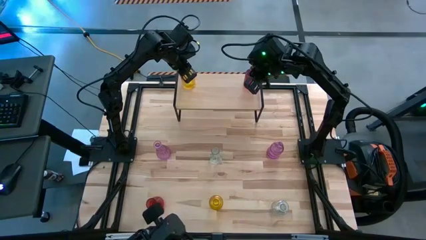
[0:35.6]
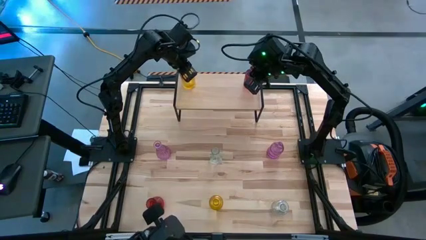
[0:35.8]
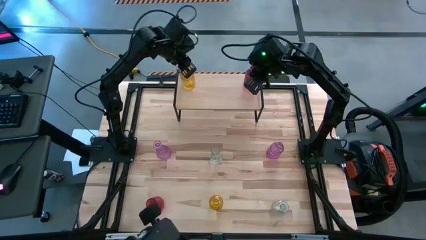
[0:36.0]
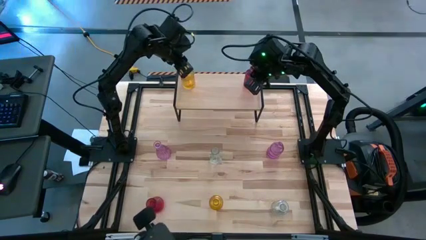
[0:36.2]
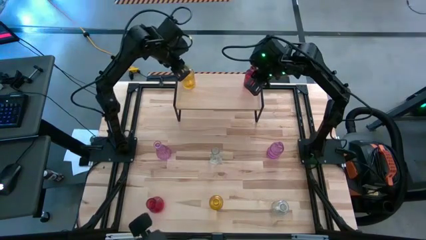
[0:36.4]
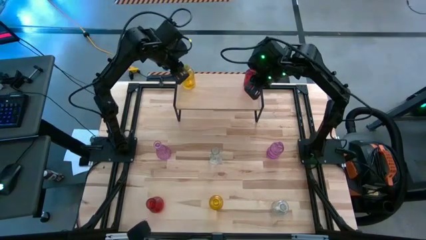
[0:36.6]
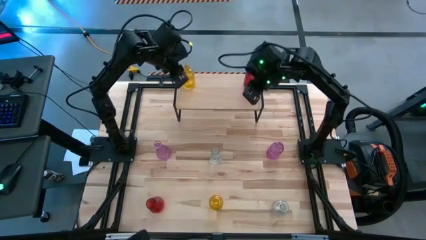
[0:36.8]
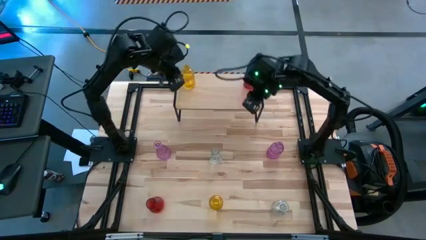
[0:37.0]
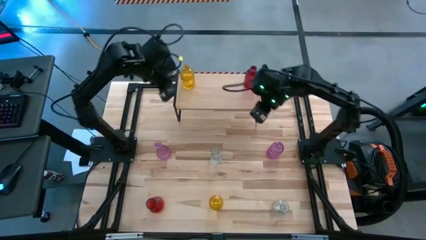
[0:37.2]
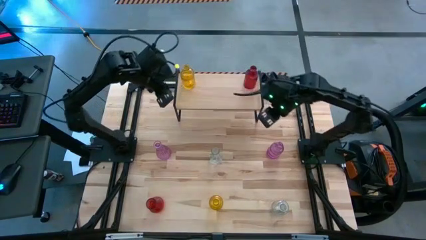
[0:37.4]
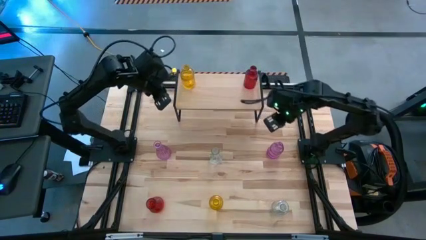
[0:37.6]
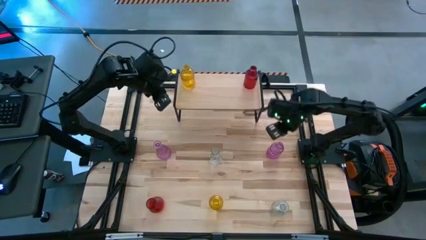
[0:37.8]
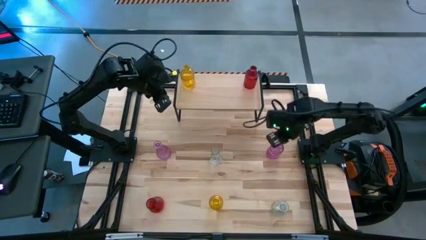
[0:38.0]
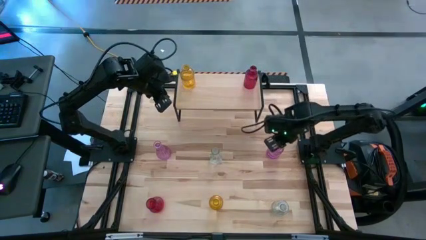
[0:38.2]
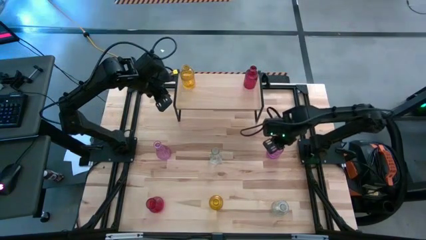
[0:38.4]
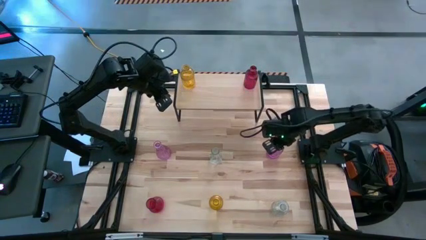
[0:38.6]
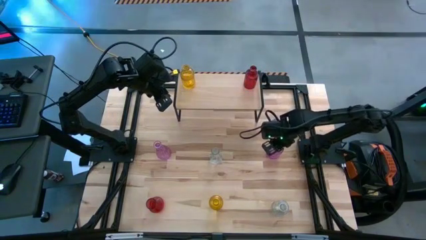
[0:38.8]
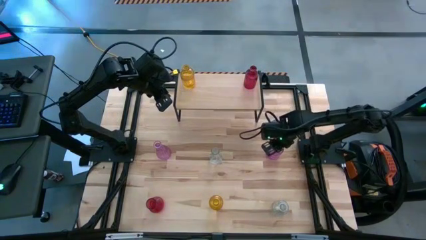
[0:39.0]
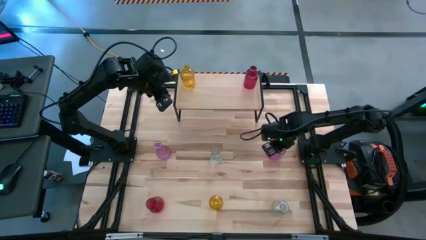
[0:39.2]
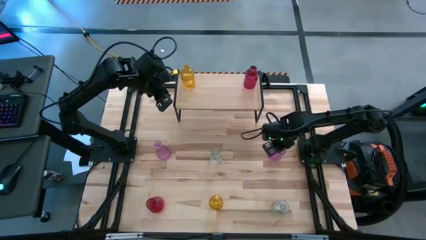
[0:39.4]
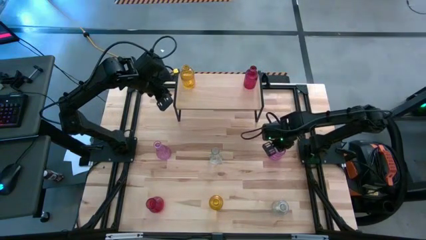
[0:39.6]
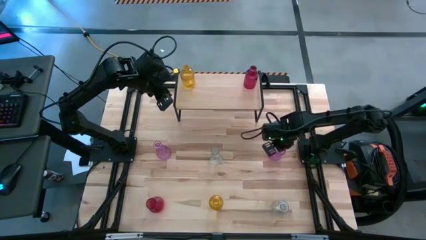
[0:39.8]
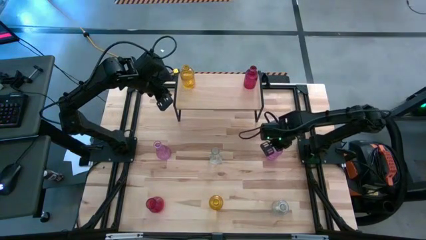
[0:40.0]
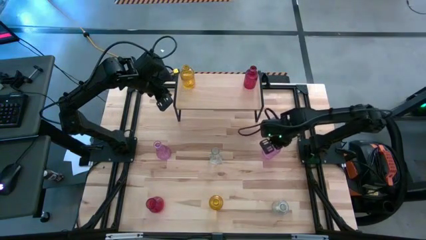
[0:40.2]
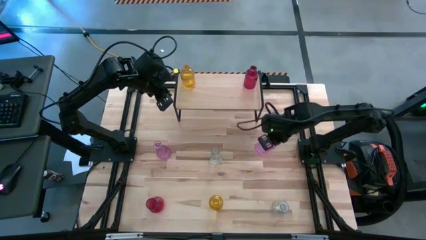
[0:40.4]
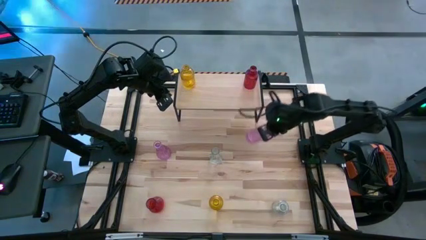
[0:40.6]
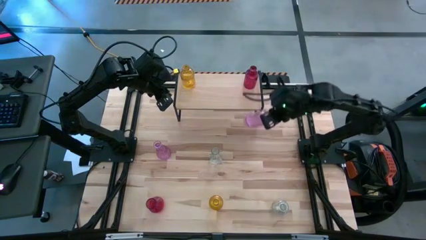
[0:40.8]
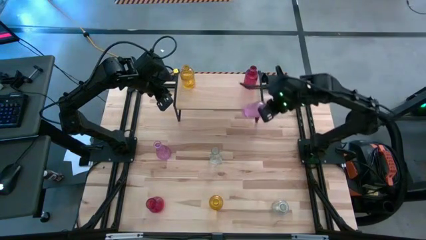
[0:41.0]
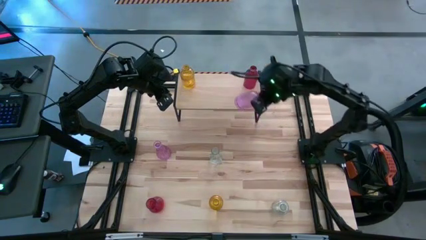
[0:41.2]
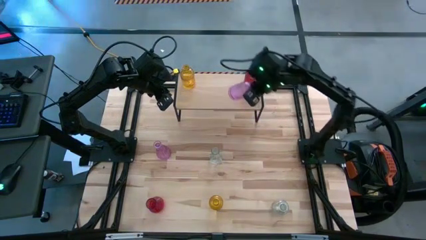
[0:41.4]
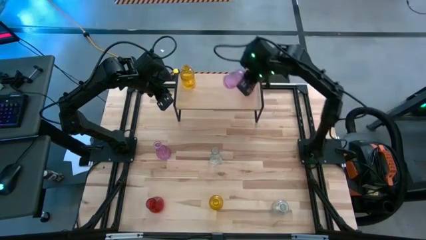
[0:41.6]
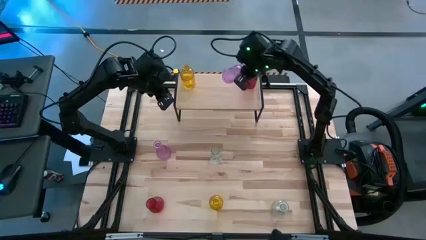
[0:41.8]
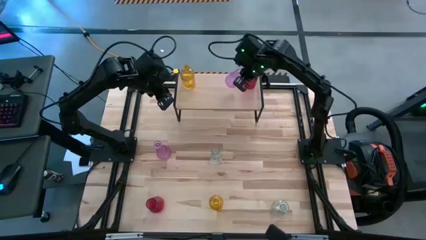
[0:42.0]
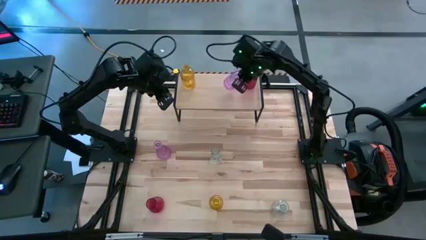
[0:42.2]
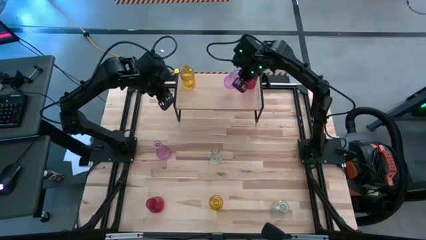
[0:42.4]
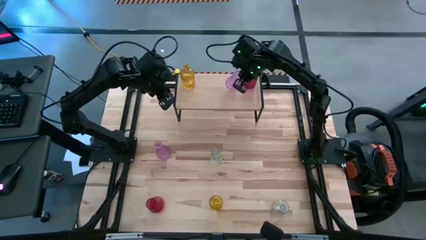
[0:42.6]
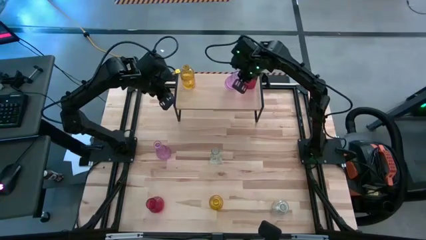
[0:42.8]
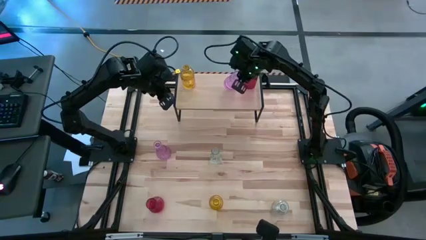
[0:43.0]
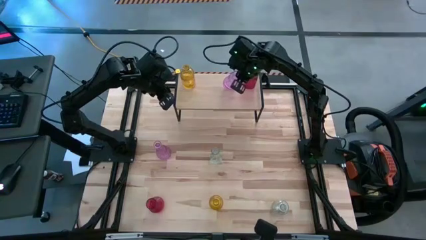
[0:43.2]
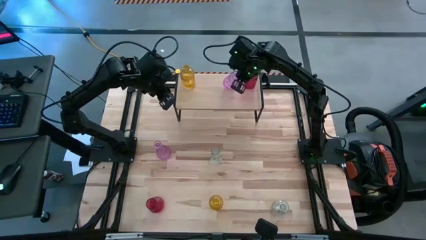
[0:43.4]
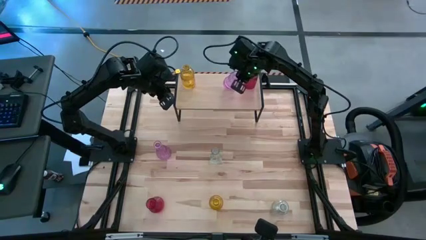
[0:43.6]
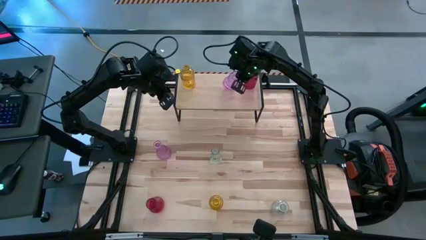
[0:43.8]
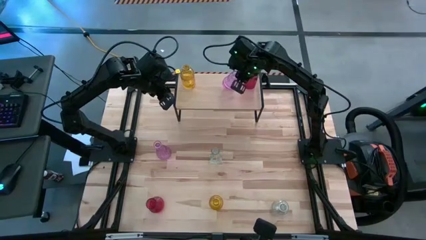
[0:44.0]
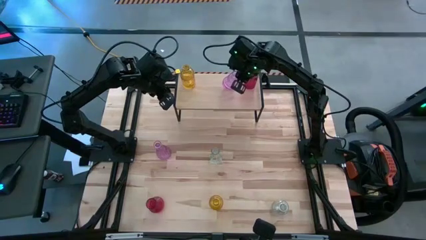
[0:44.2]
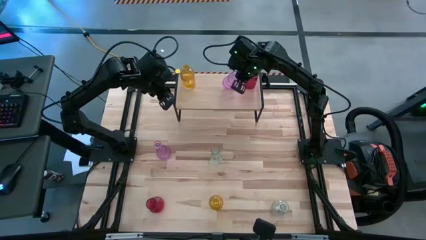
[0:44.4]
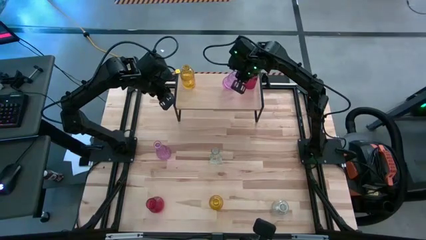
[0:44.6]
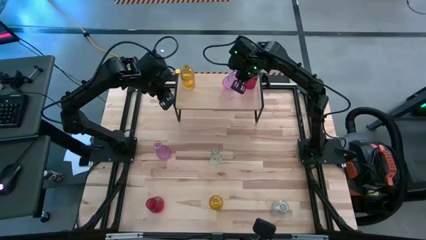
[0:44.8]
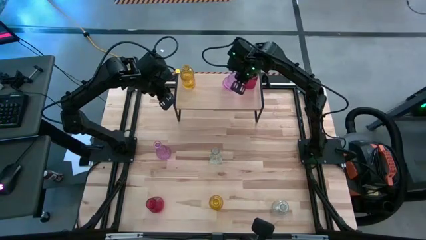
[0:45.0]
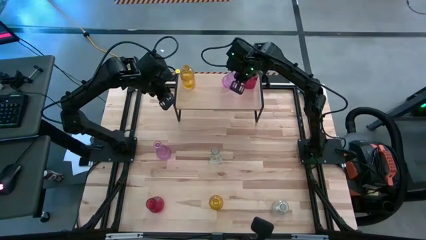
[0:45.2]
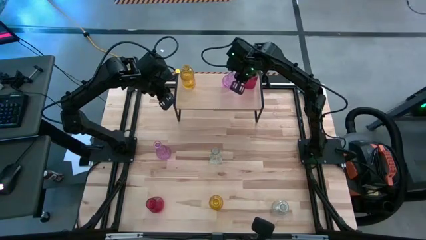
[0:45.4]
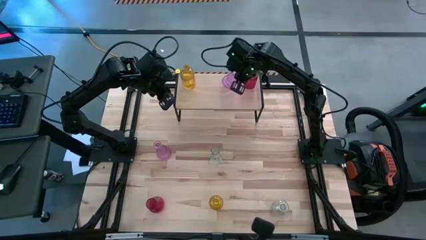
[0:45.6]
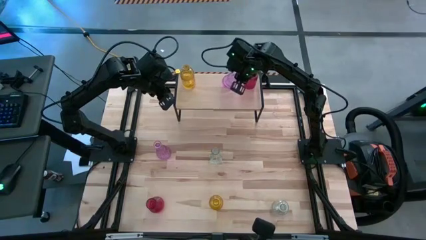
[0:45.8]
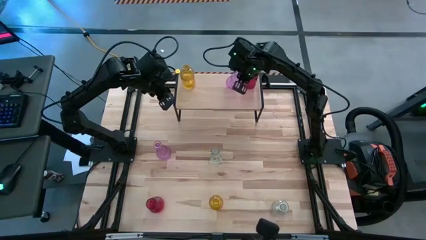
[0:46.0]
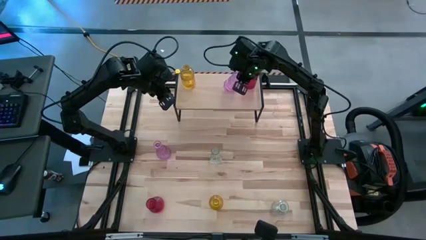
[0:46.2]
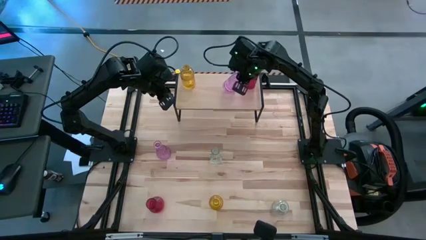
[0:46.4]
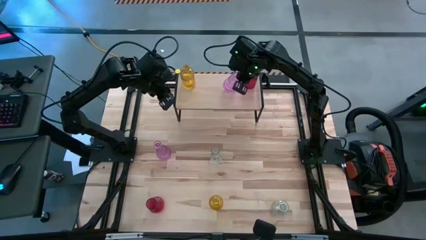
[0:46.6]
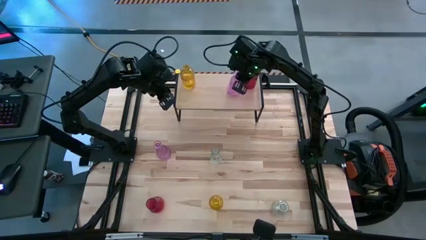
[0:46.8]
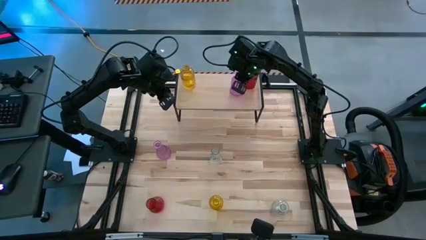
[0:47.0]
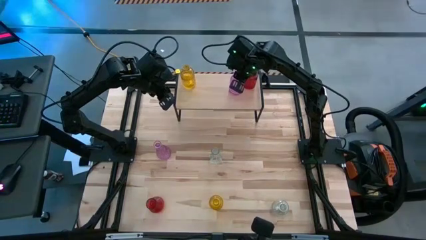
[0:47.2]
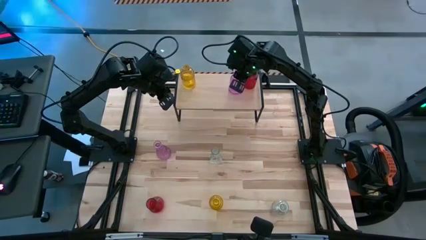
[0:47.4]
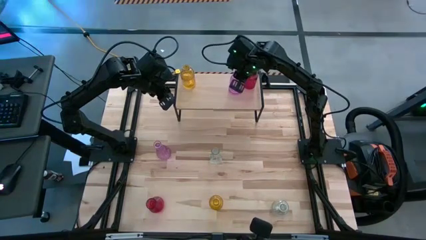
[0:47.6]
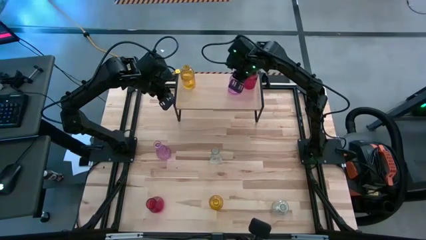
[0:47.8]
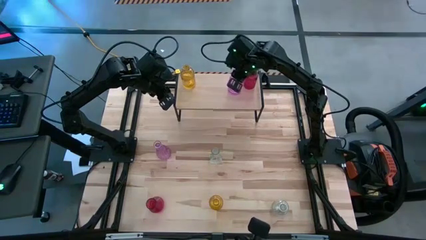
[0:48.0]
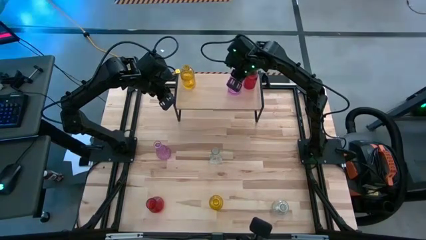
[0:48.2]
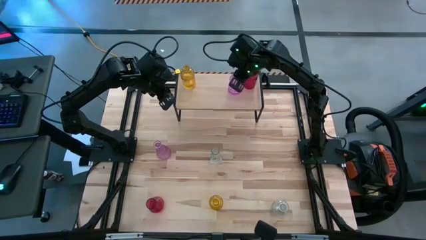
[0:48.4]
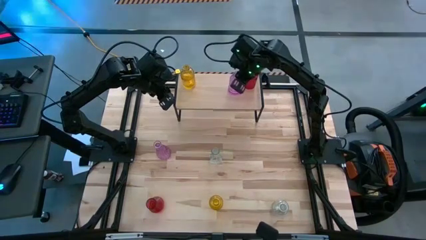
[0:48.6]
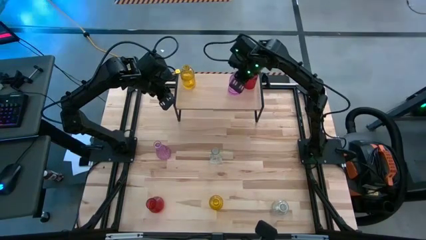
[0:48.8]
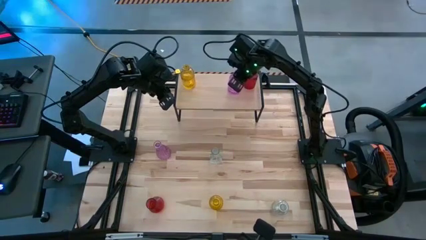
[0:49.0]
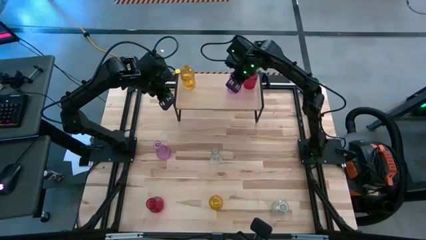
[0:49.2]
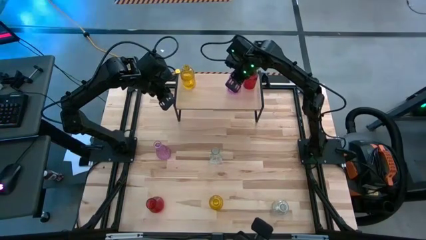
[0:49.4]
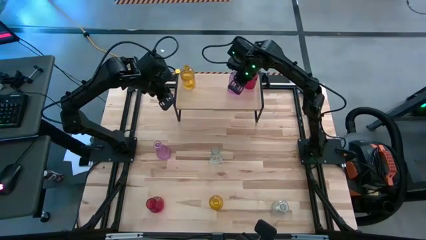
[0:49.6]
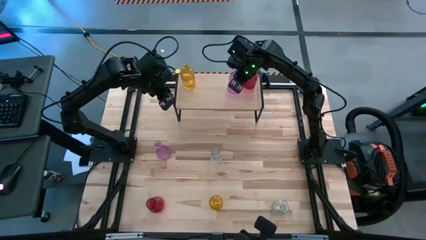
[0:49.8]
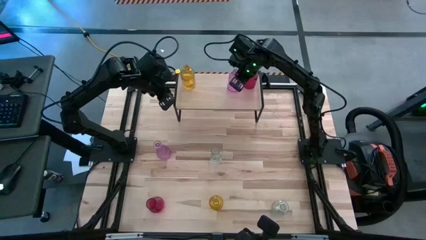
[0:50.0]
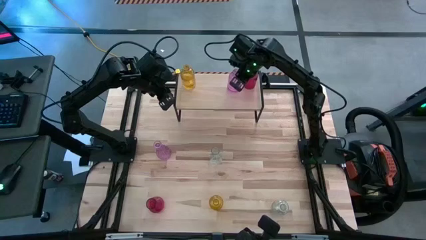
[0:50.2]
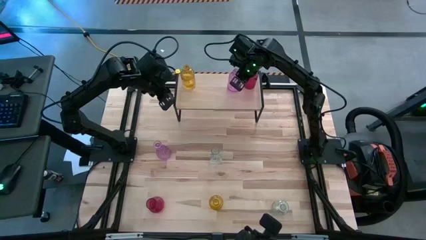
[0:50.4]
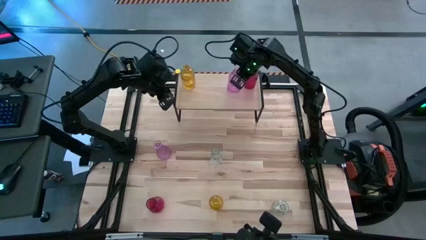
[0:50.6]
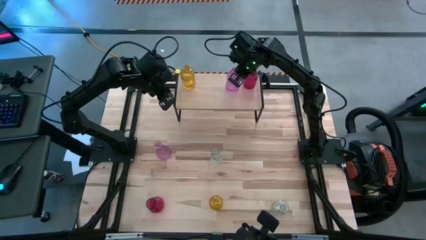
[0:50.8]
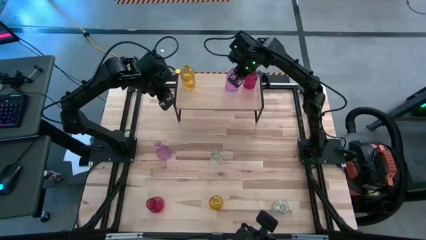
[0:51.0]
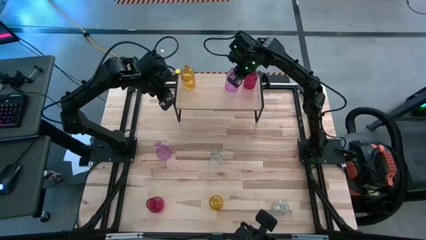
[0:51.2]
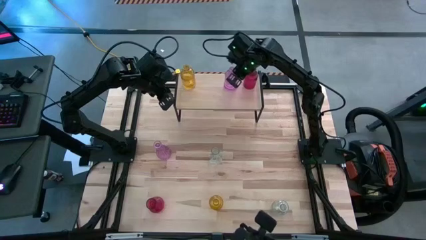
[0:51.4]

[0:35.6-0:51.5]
Task: sort vases onto shelf
Put the right purple vase on the shelf
